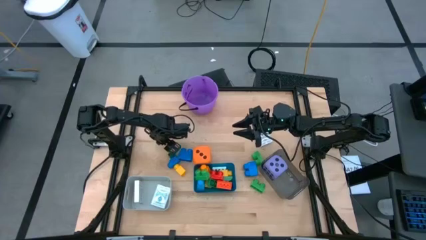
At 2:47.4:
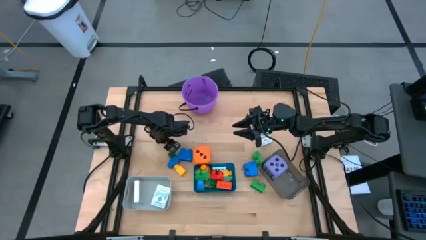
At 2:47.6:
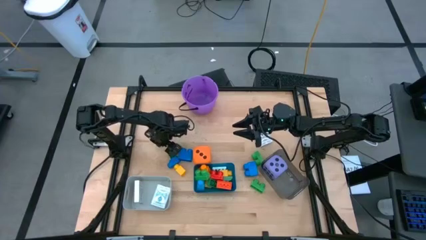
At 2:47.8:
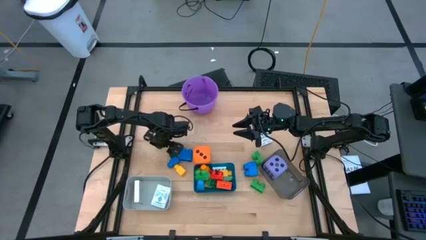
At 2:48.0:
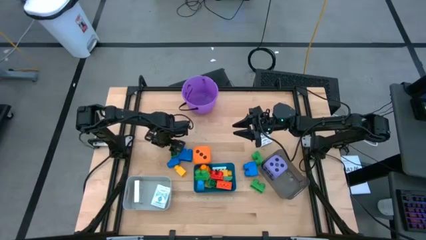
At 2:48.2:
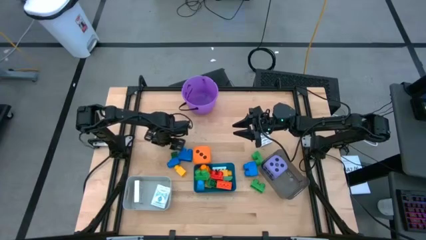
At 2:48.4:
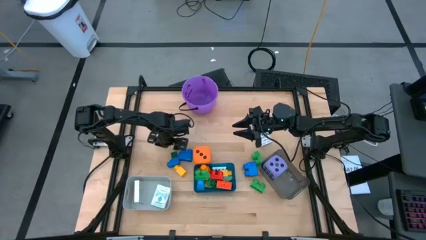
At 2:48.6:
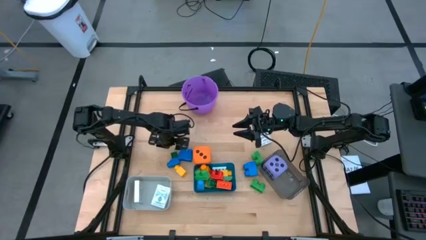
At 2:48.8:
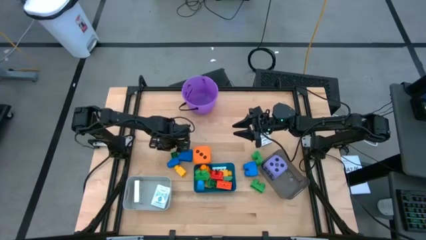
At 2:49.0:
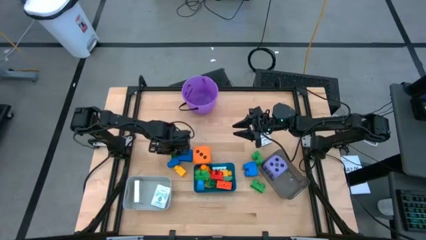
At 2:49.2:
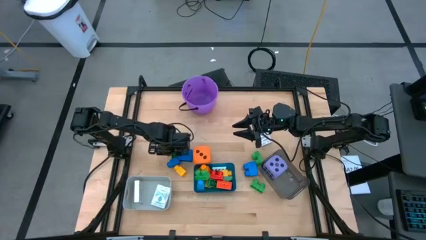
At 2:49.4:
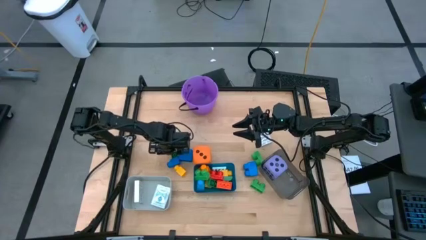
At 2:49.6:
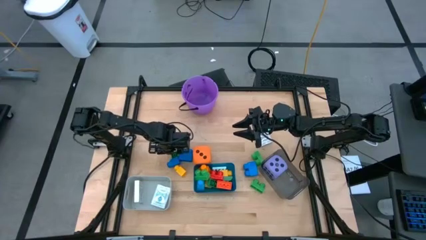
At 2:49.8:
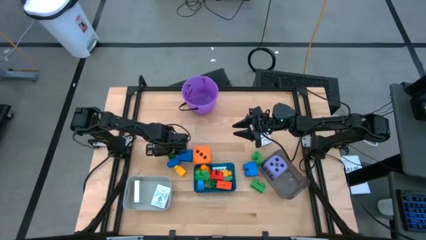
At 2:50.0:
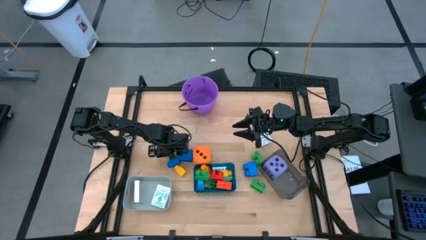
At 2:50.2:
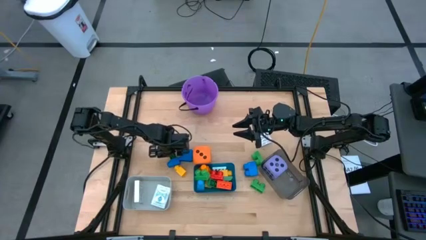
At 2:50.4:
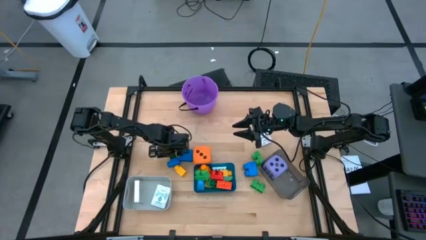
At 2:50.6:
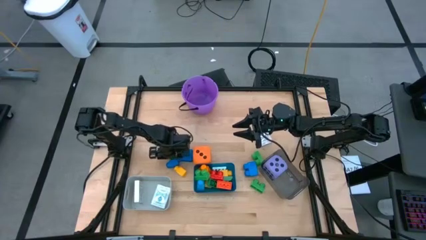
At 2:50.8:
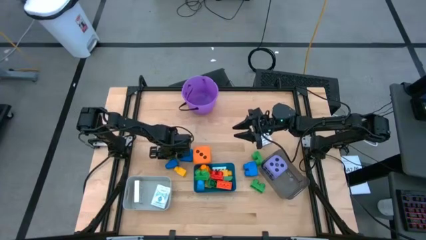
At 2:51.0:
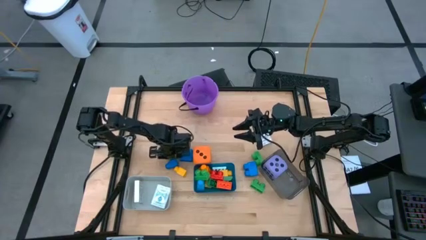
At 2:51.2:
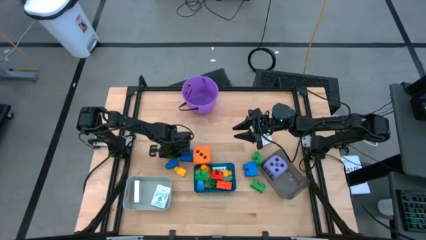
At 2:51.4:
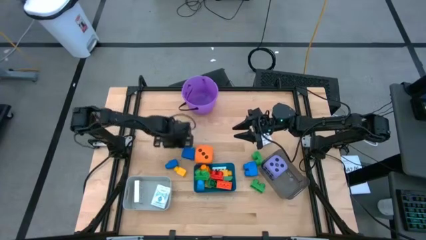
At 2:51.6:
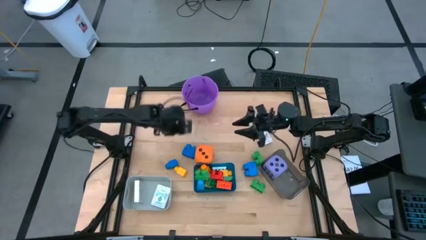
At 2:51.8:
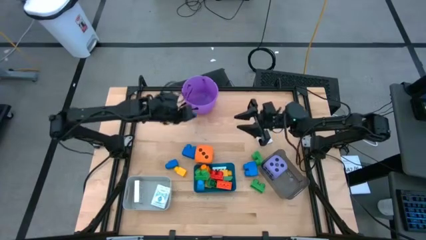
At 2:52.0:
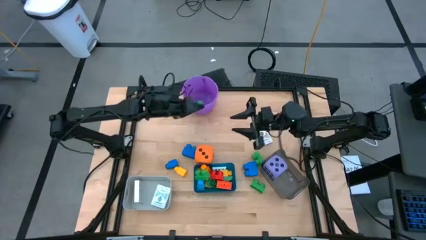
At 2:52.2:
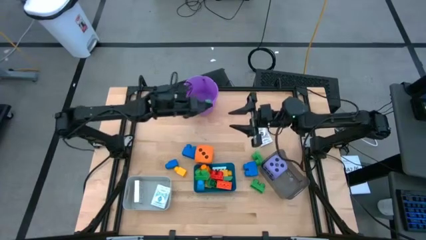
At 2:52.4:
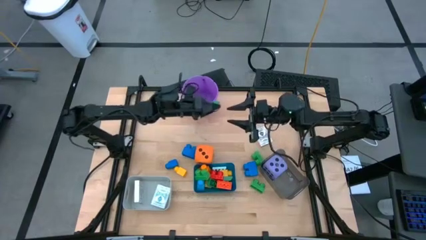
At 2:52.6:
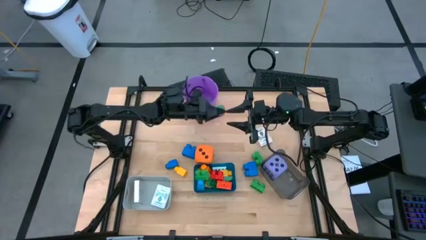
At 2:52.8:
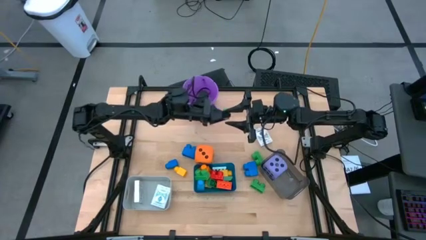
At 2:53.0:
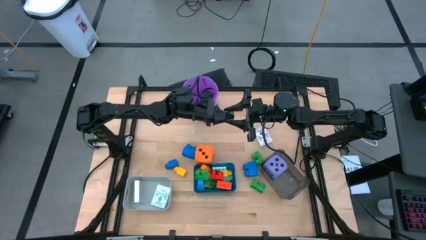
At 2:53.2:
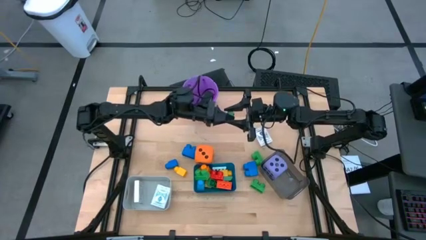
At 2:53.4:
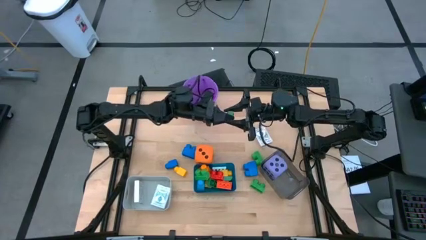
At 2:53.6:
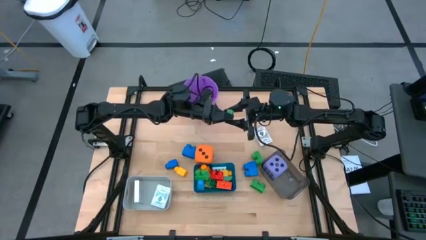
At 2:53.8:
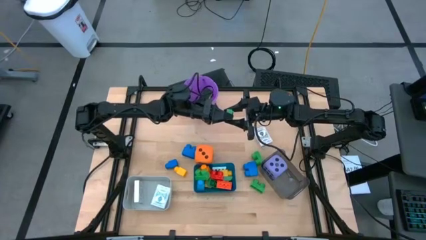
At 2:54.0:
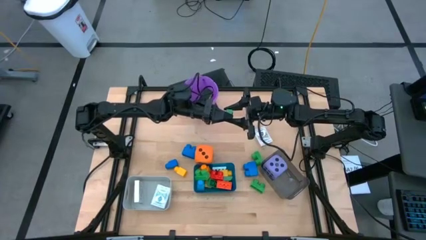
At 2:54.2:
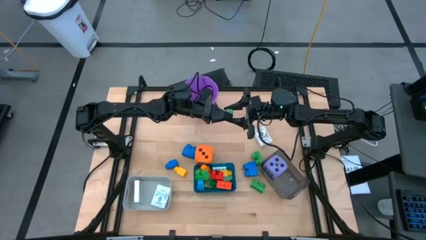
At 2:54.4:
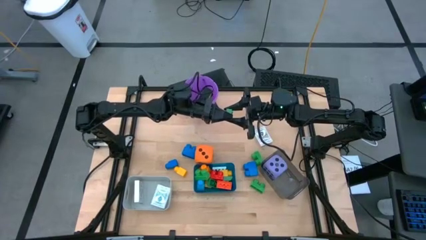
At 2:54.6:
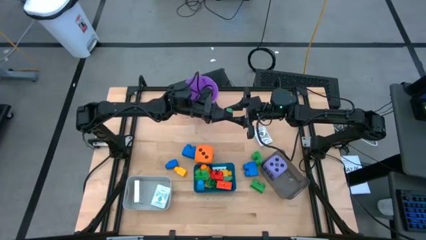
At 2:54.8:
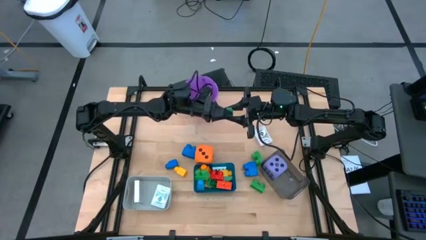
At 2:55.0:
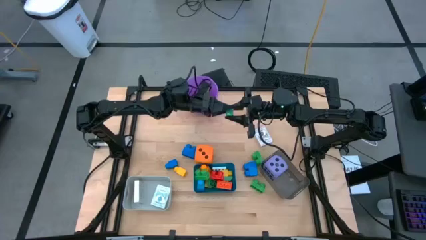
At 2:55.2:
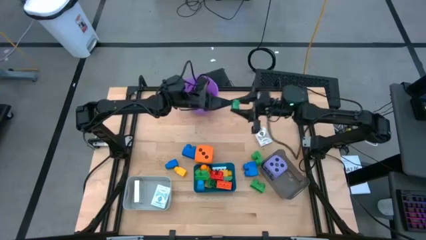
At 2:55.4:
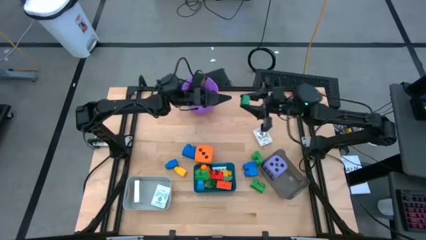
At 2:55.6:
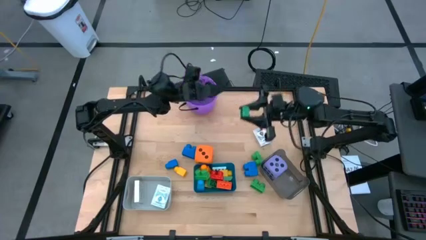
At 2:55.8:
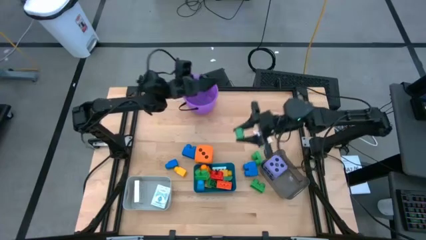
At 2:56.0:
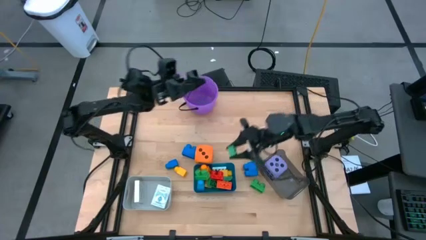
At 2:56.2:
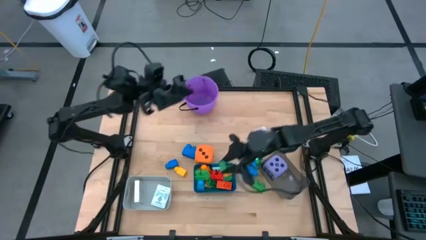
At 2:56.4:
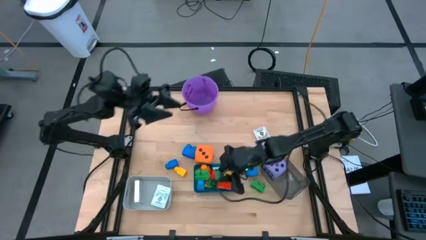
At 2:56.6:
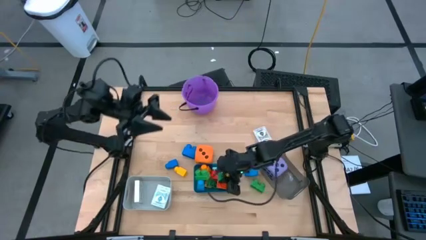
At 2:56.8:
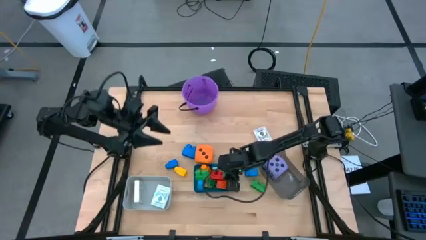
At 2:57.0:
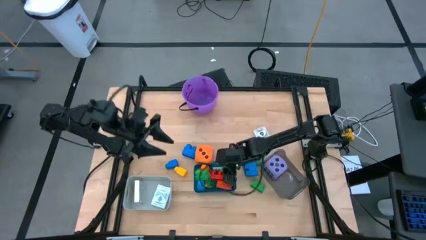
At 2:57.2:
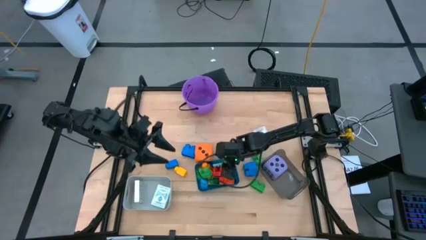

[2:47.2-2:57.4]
Task: Pick & Place Toys
Put the green game piece into the blue bin

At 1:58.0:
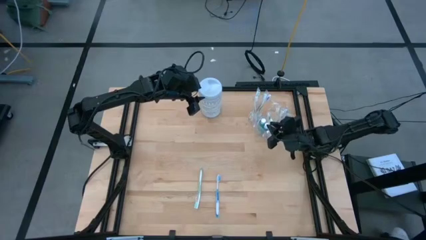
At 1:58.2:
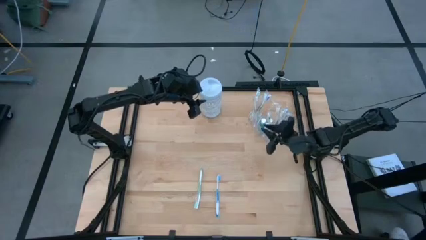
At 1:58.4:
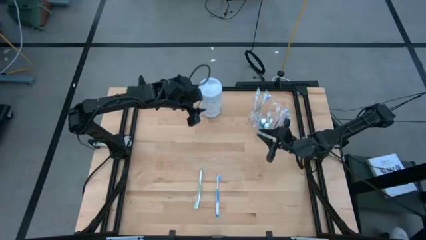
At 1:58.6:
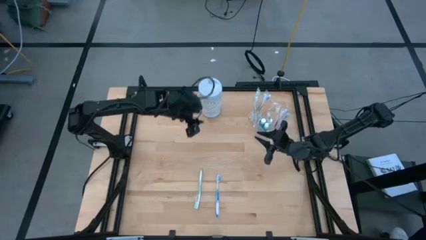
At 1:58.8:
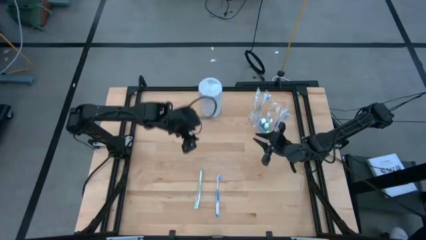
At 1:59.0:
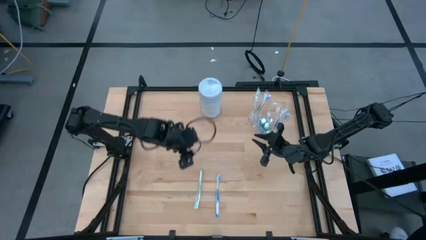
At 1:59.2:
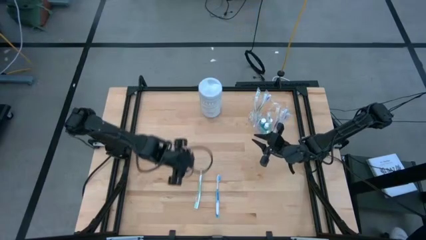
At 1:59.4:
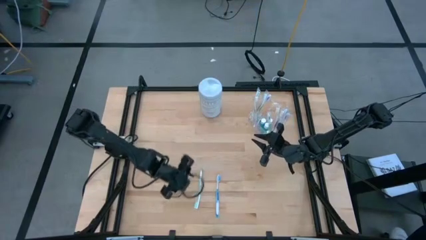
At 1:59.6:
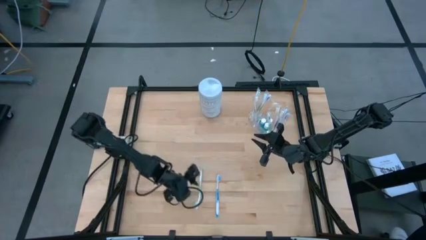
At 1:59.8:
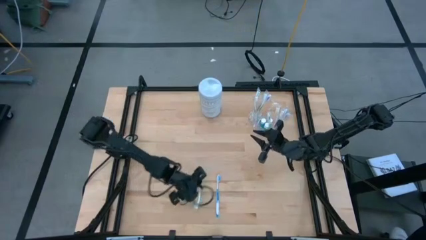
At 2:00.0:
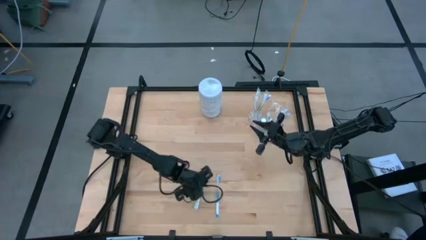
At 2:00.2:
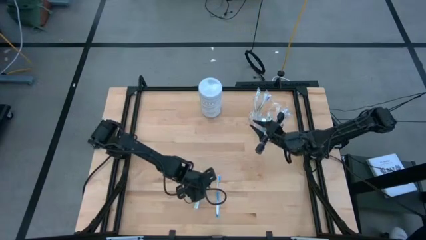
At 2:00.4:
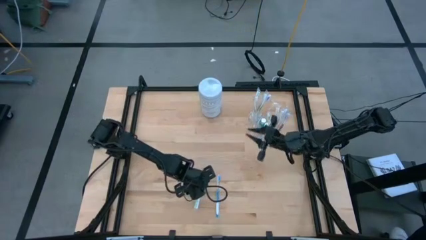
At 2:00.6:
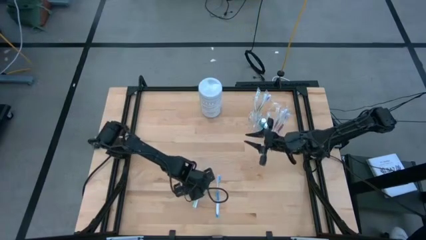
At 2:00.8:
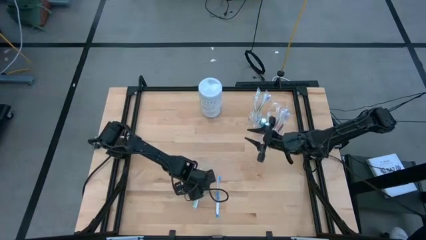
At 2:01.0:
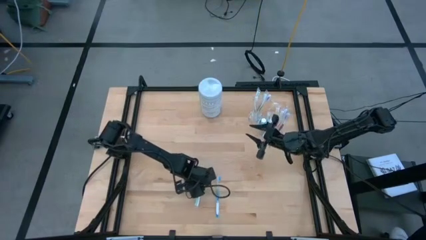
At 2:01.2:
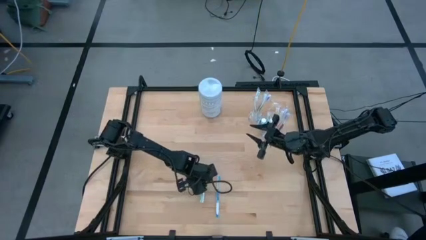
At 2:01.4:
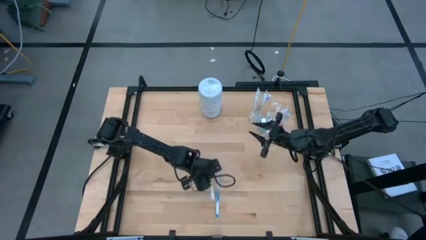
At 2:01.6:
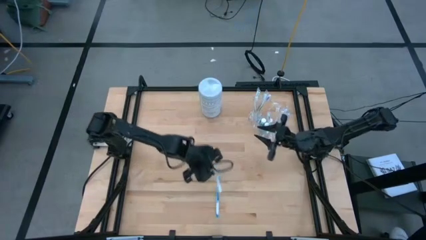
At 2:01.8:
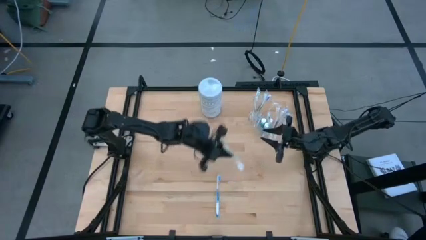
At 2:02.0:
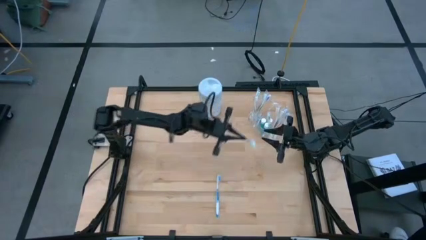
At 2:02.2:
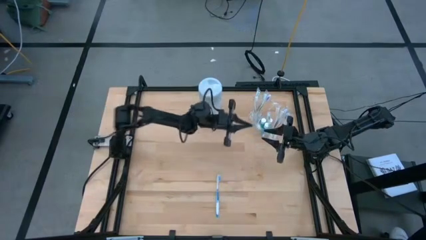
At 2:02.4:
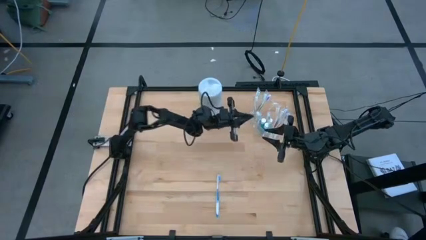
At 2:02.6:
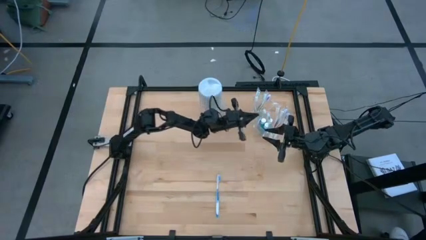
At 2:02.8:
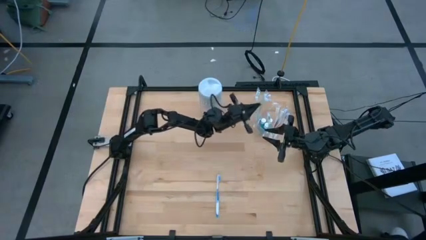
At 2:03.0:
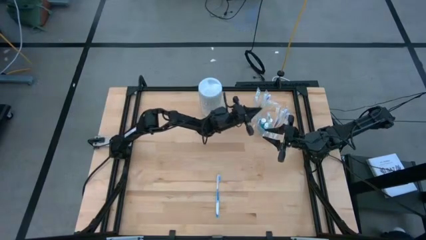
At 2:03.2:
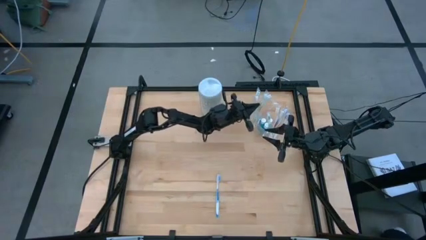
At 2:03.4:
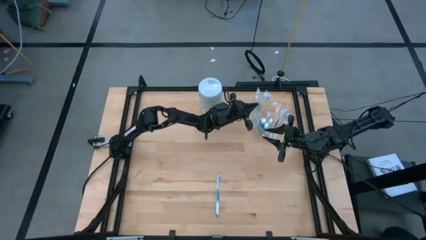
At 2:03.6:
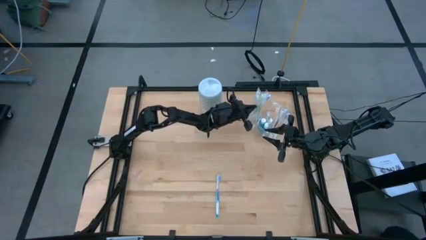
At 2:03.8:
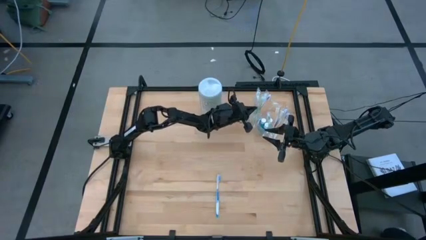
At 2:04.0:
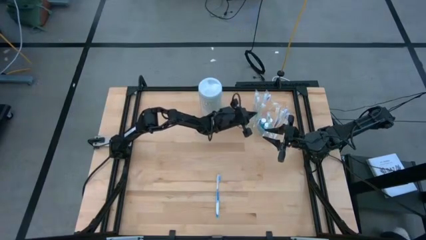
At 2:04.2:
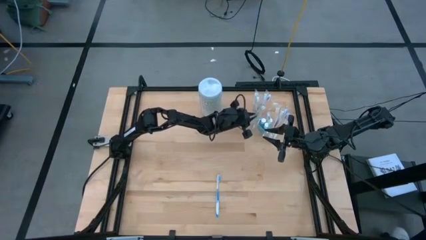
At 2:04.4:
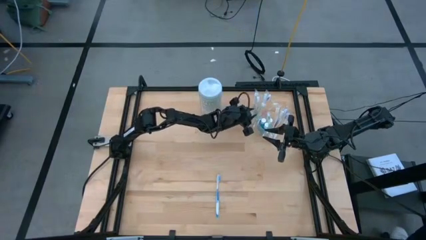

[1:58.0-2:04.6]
Task: Pick & Place toothbrushing station
Put the green toothbrush into the transparent organizer
